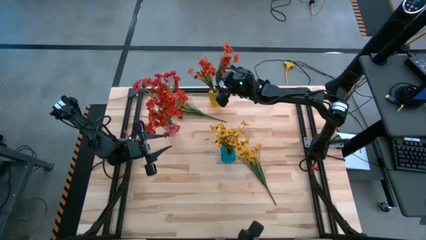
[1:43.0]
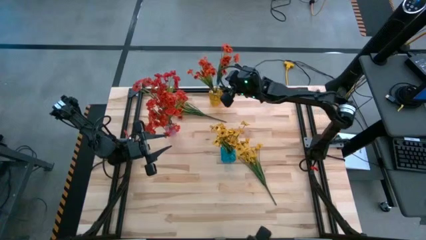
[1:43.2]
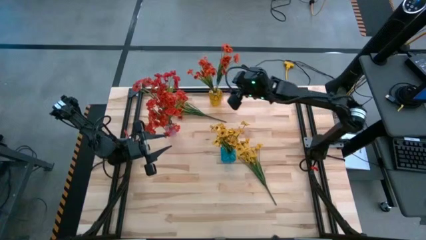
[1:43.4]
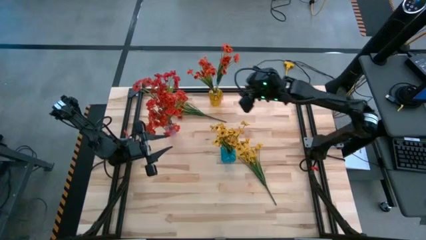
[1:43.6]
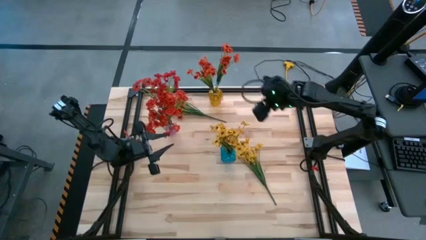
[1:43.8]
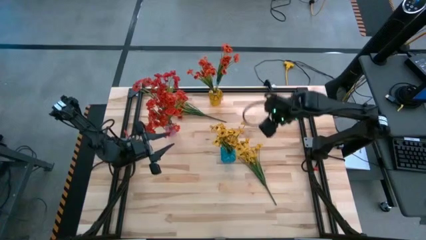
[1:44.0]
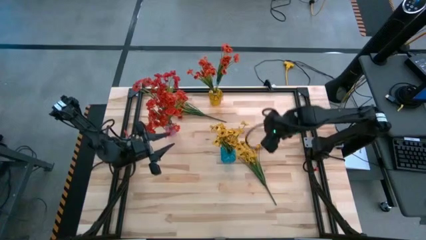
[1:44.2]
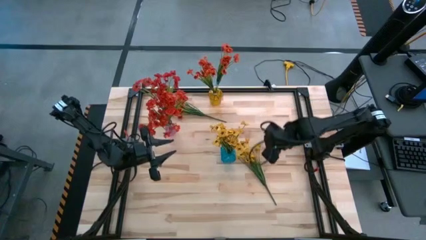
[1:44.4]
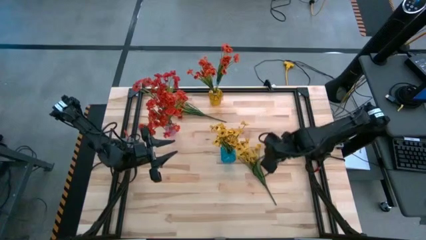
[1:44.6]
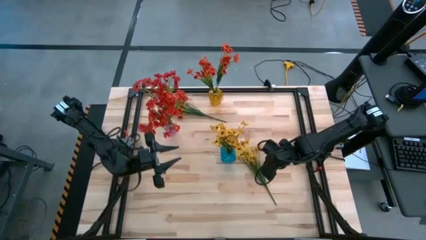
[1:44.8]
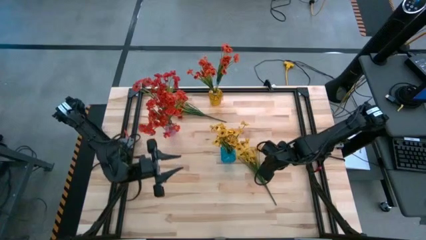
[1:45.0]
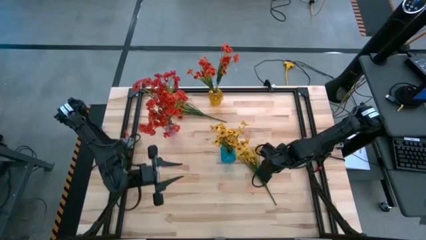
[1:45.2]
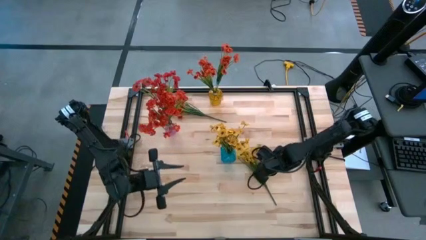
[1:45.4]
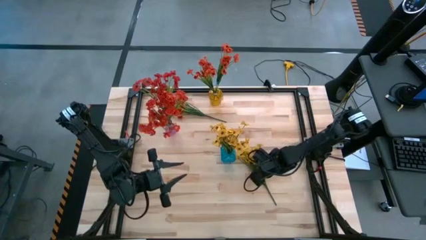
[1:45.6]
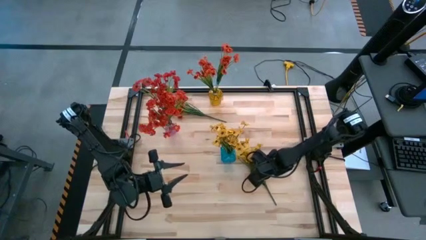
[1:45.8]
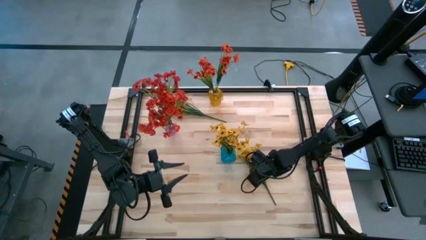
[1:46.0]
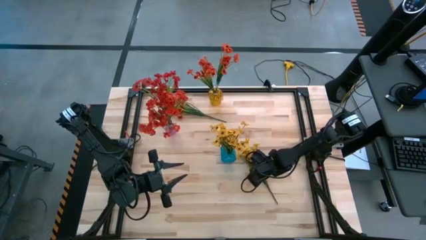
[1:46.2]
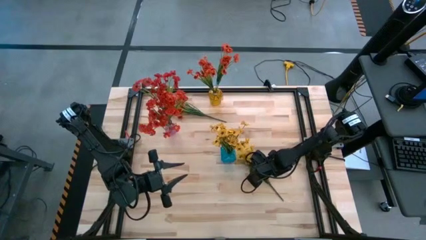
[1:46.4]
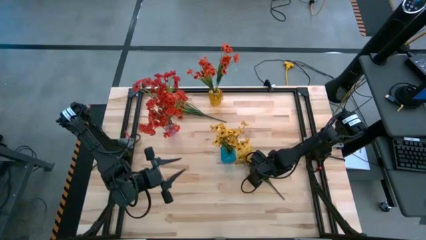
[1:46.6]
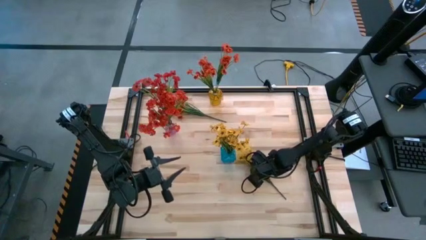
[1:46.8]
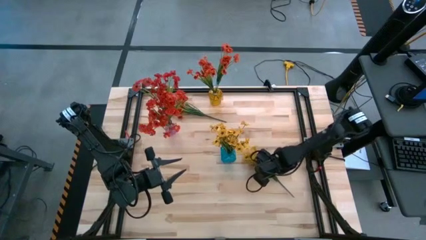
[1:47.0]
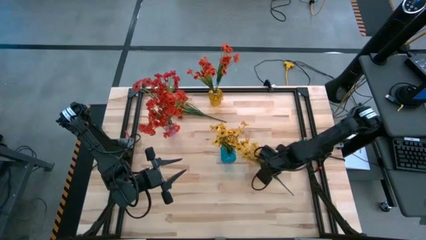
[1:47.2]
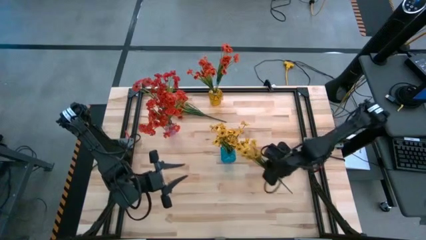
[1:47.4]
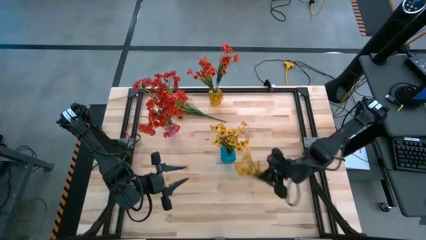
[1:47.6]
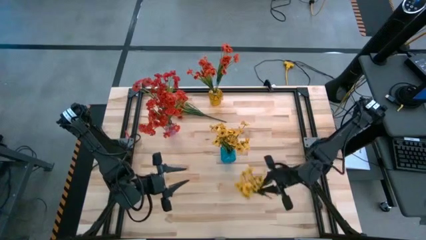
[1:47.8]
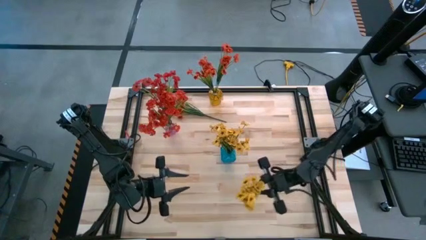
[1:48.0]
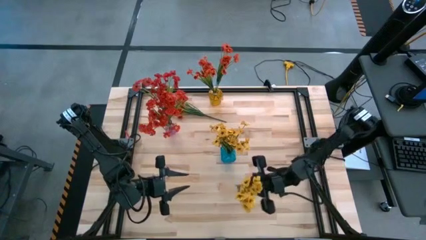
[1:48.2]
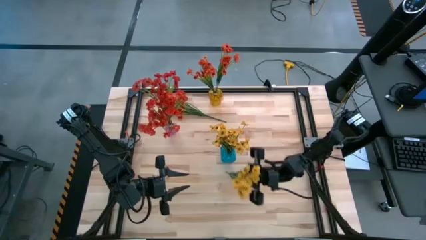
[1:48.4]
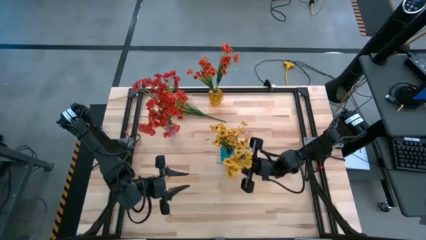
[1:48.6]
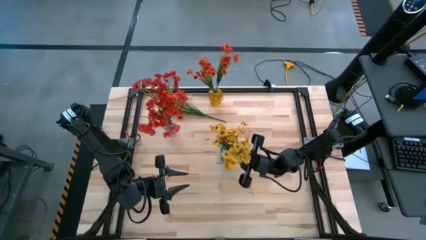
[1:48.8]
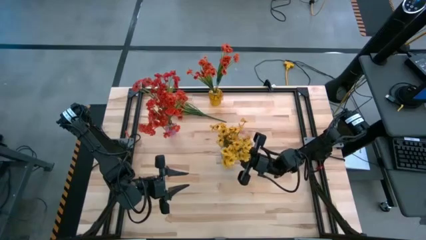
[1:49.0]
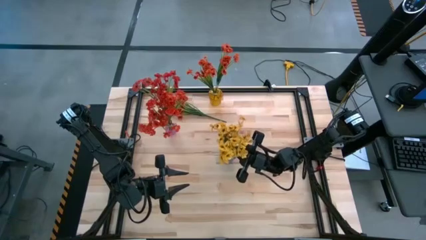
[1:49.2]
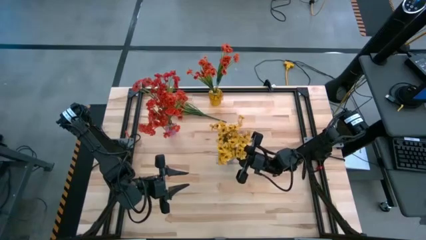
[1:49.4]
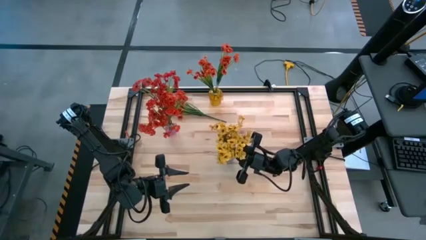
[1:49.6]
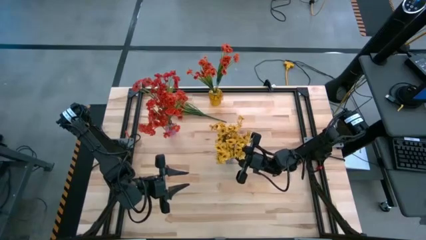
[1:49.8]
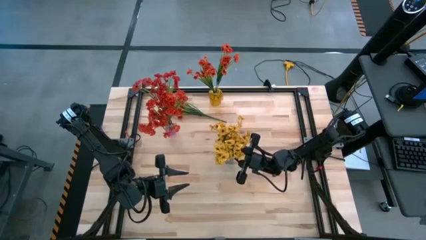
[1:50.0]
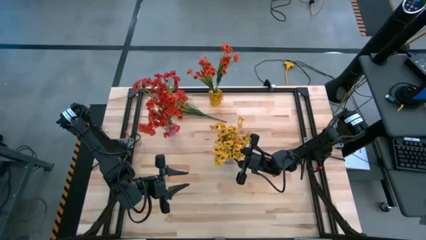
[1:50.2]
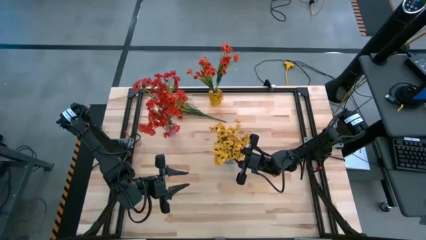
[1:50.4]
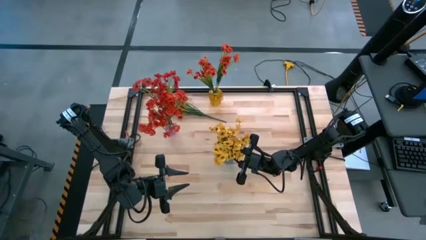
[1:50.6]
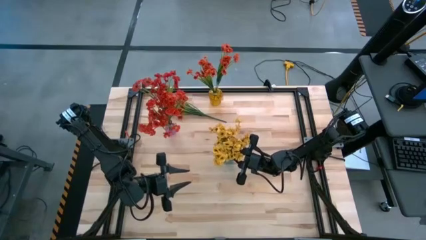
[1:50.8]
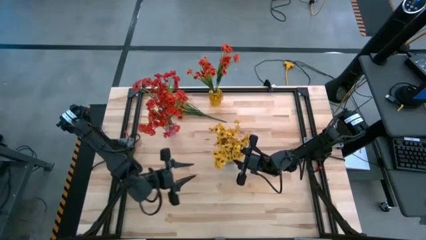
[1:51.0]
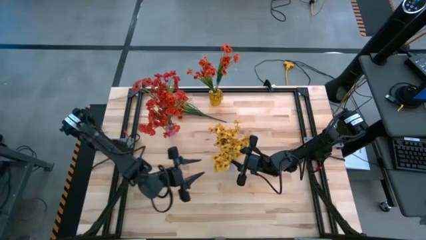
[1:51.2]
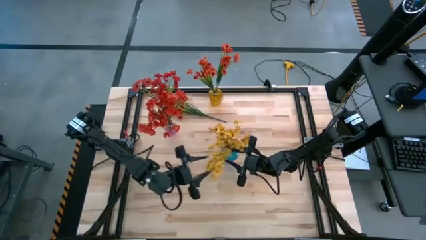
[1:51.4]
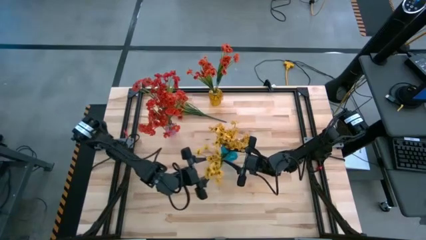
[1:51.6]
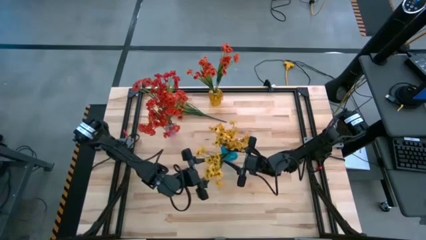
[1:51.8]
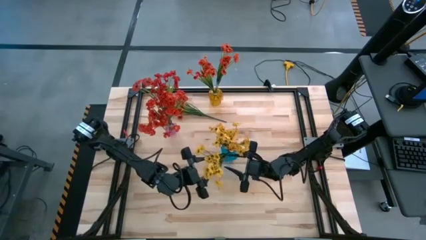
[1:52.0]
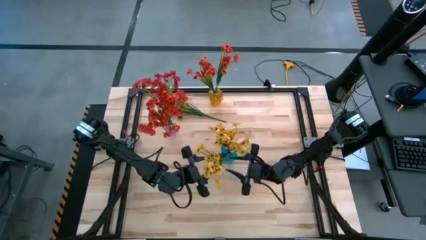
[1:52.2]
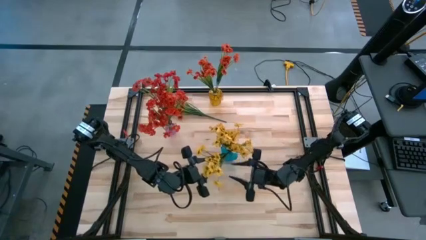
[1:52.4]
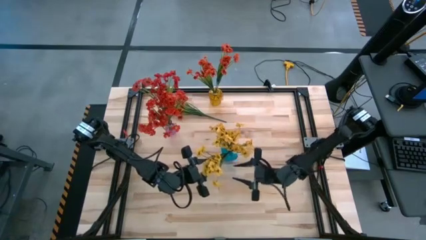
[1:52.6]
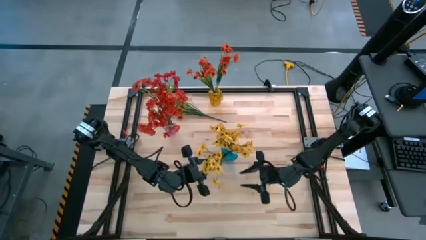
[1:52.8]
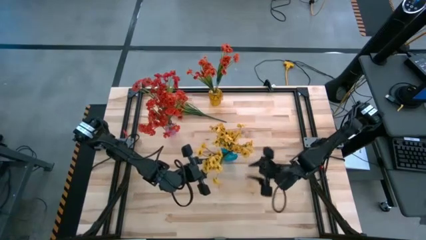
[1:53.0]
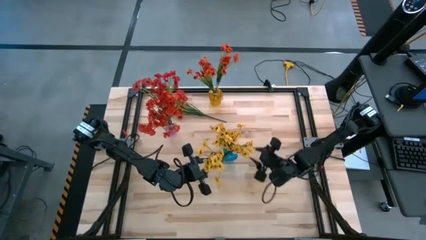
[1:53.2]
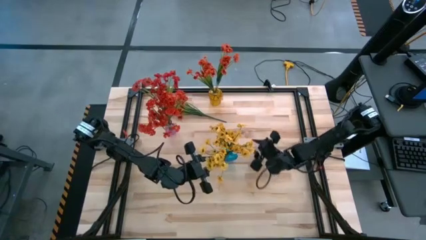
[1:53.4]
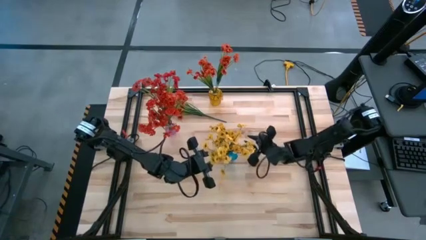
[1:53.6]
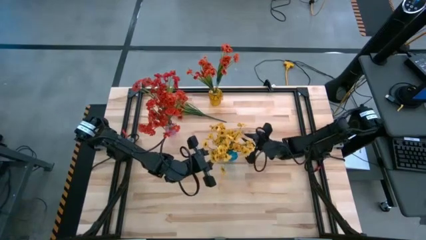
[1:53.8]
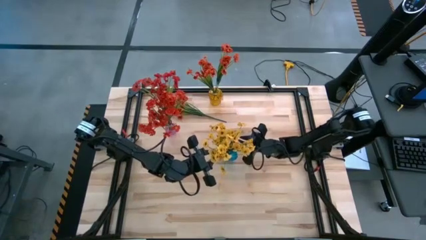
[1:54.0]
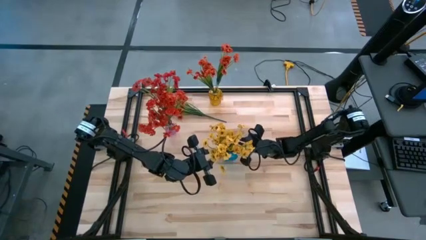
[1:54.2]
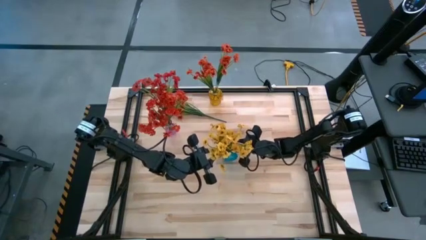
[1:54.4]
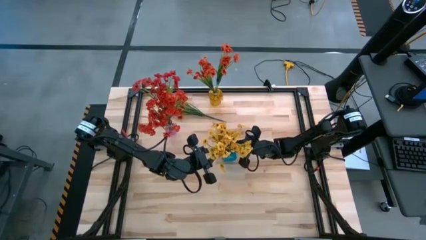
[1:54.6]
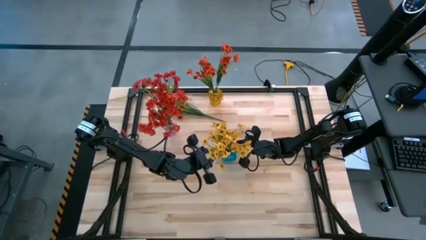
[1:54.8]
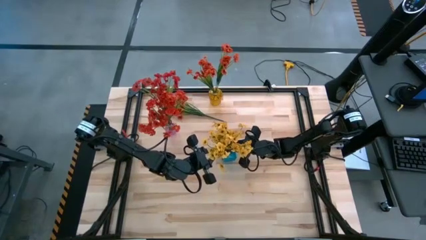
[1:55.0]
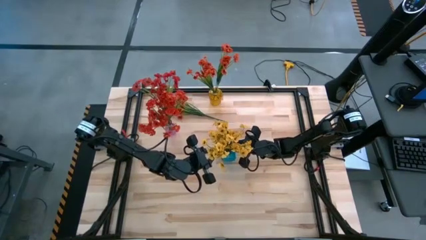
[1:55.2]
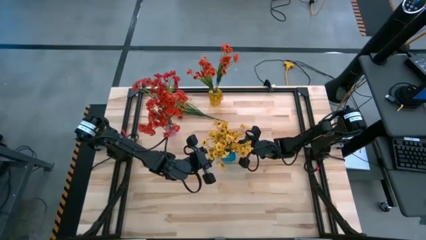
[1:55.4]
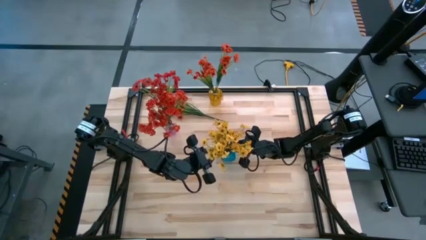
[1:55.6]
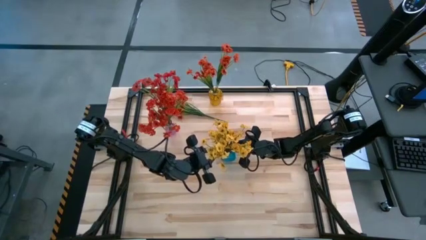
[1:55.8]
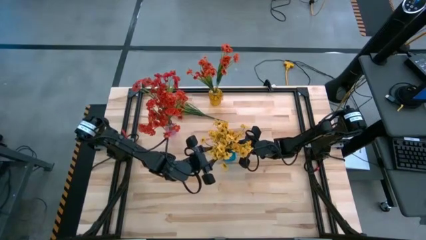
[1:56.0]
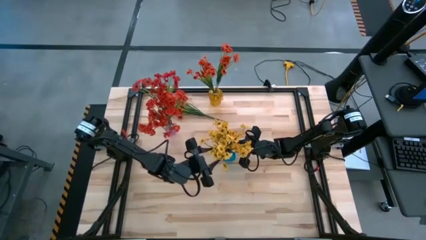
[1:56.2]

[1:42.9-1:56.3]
Task: Sort flowers into vase by color
Put the yellow flowers into the blue vase
